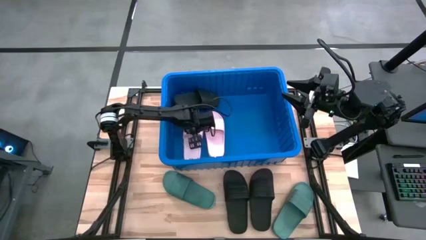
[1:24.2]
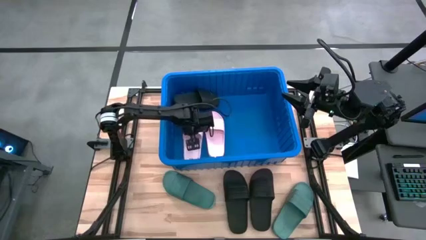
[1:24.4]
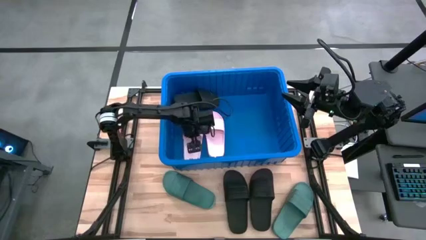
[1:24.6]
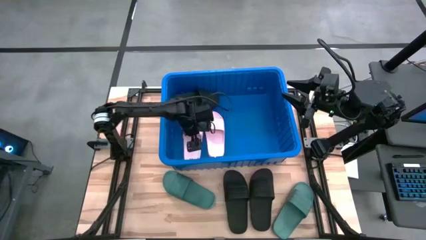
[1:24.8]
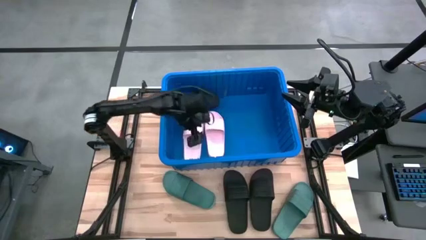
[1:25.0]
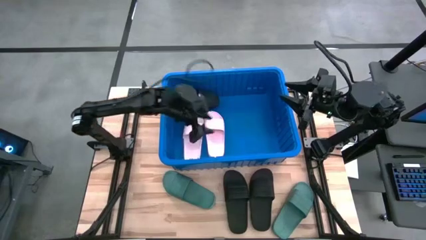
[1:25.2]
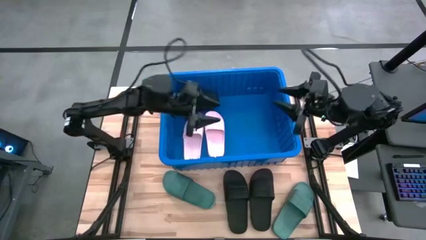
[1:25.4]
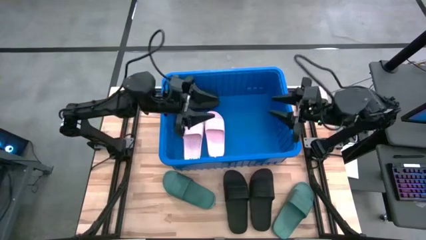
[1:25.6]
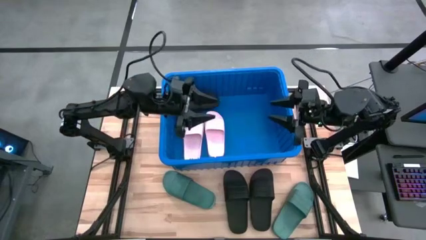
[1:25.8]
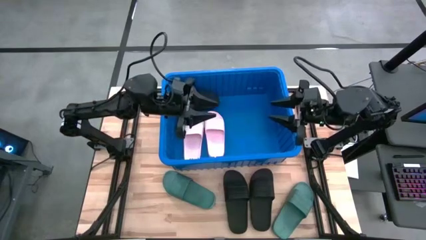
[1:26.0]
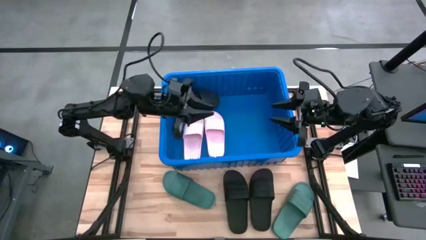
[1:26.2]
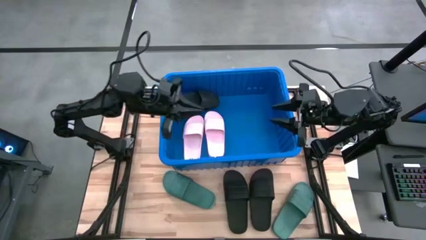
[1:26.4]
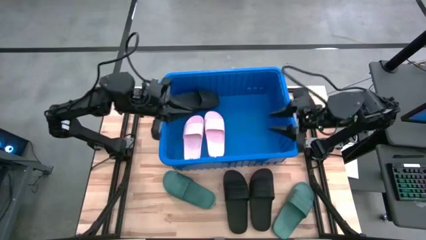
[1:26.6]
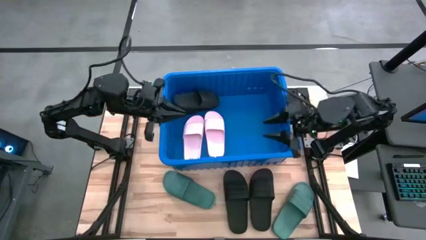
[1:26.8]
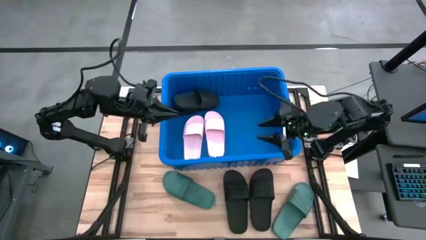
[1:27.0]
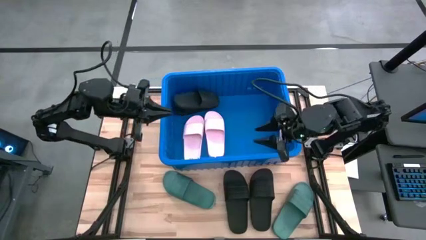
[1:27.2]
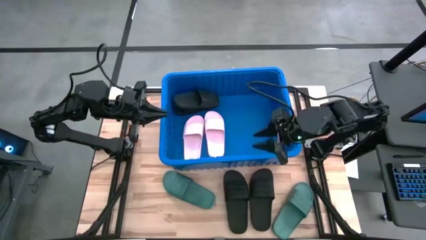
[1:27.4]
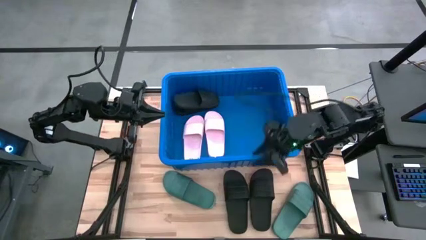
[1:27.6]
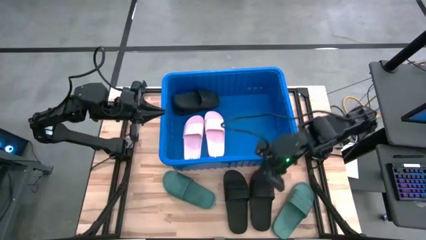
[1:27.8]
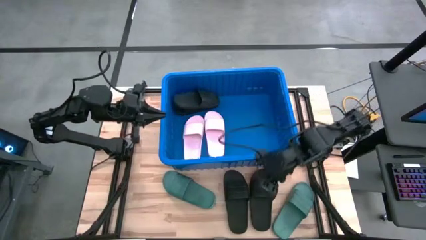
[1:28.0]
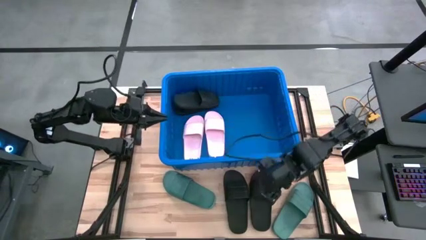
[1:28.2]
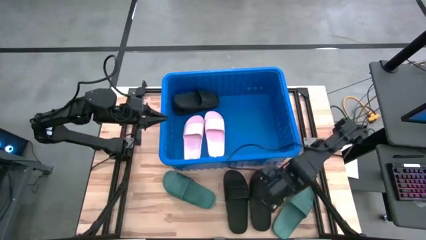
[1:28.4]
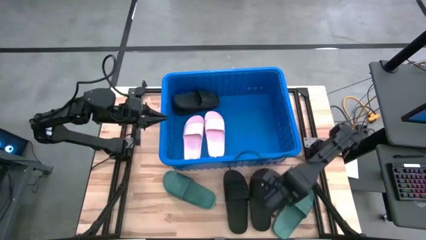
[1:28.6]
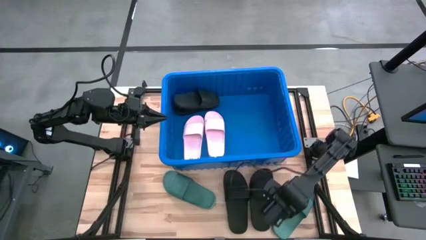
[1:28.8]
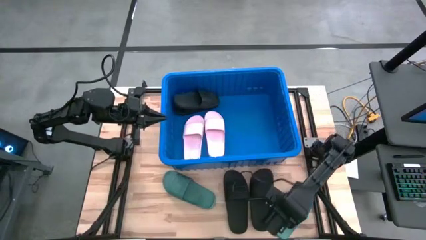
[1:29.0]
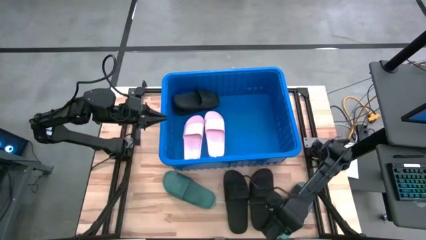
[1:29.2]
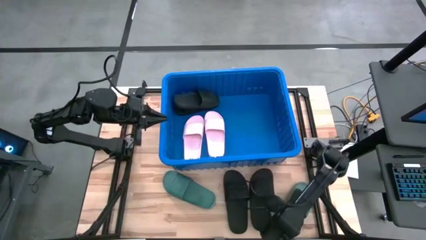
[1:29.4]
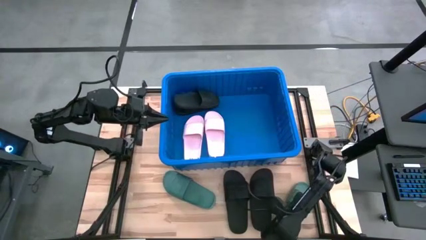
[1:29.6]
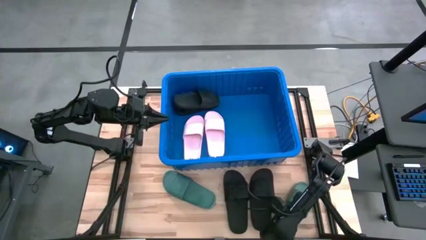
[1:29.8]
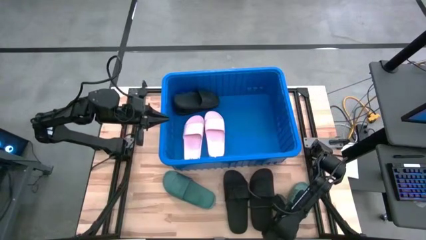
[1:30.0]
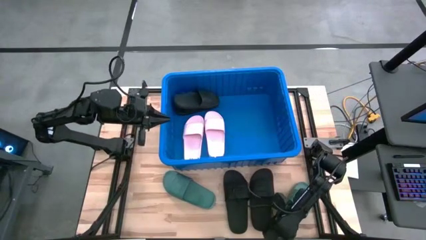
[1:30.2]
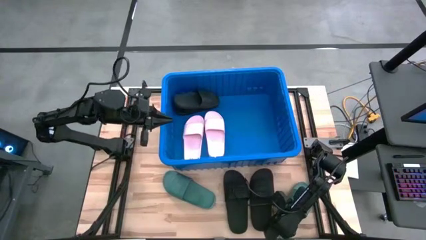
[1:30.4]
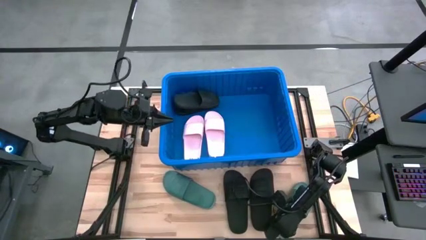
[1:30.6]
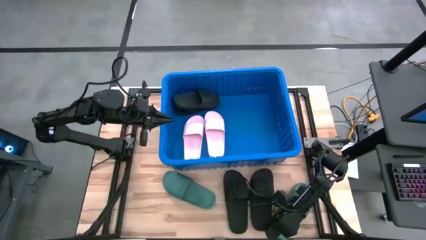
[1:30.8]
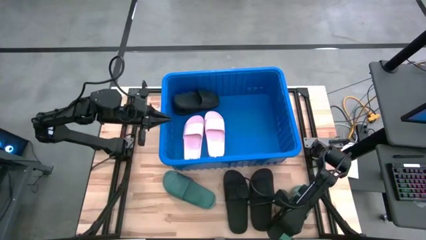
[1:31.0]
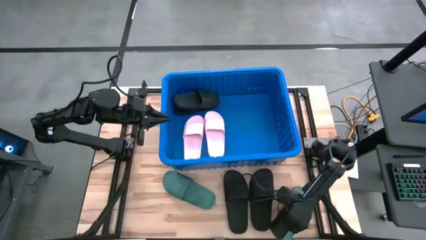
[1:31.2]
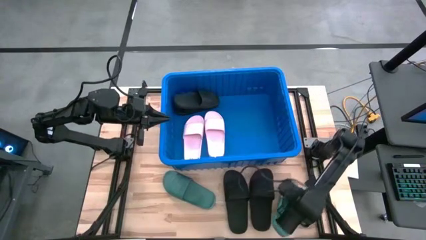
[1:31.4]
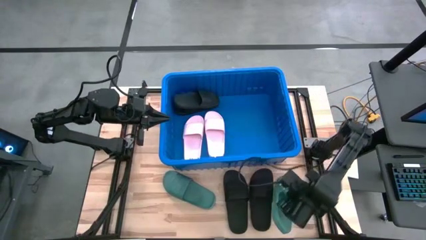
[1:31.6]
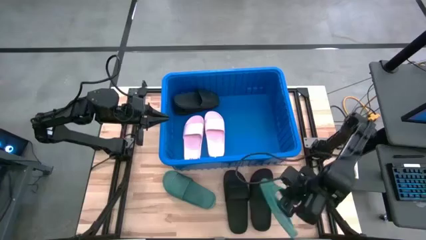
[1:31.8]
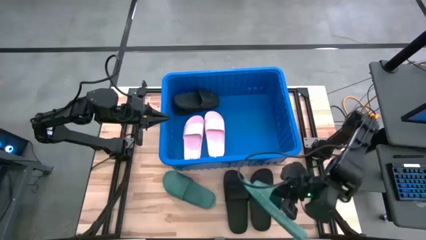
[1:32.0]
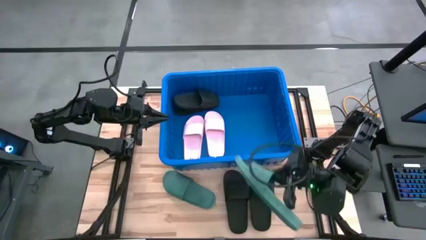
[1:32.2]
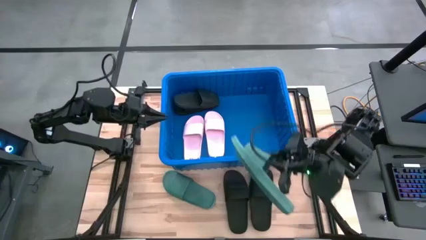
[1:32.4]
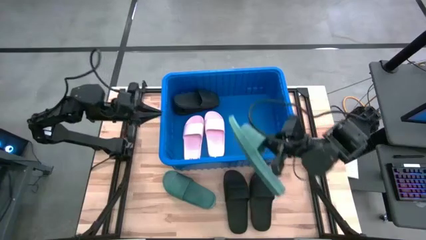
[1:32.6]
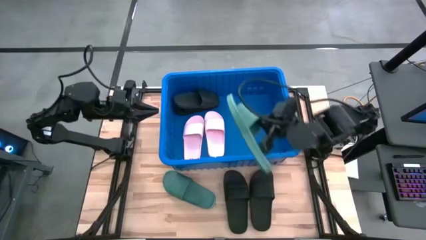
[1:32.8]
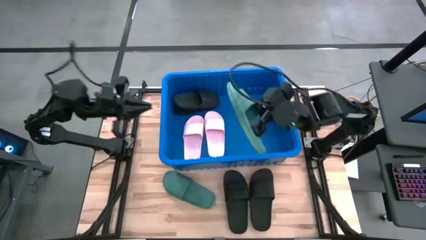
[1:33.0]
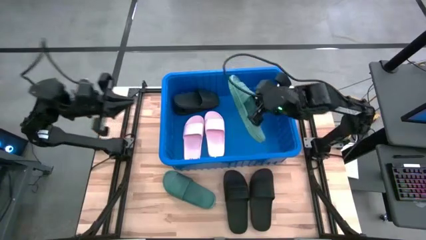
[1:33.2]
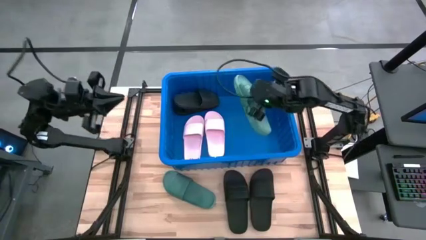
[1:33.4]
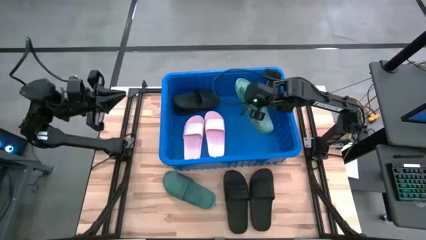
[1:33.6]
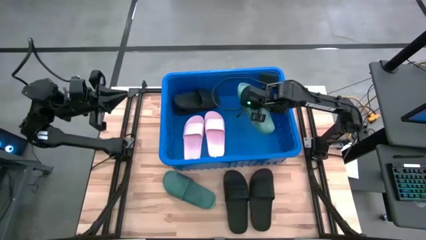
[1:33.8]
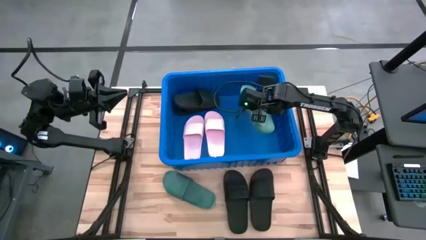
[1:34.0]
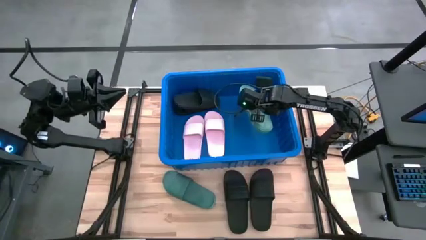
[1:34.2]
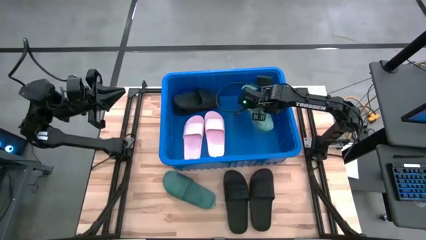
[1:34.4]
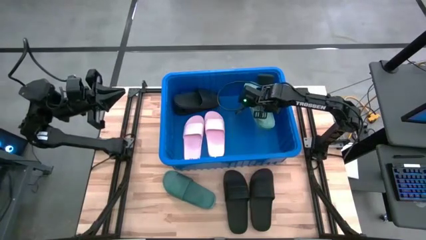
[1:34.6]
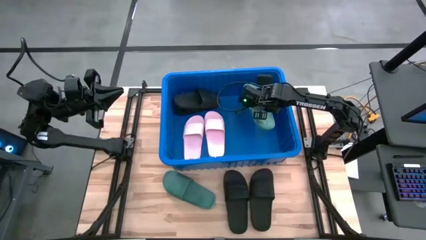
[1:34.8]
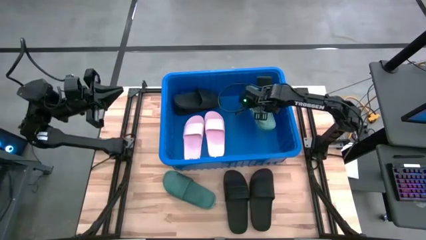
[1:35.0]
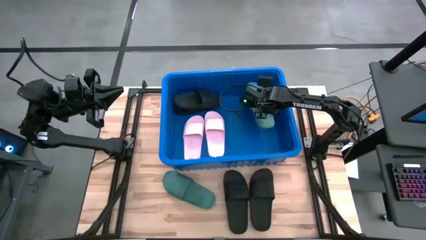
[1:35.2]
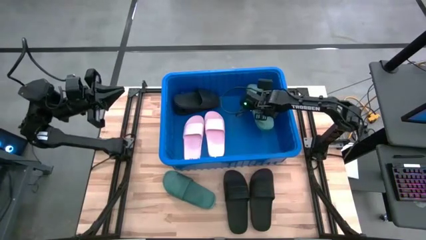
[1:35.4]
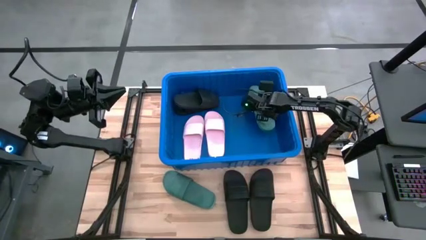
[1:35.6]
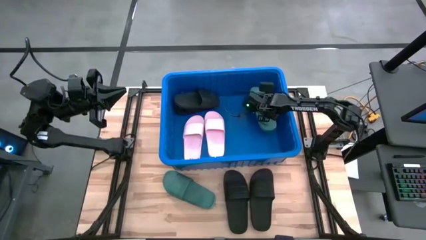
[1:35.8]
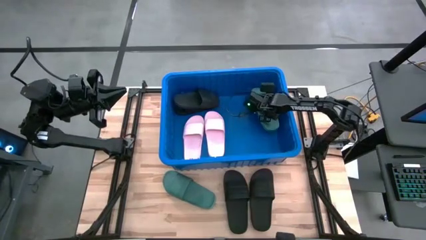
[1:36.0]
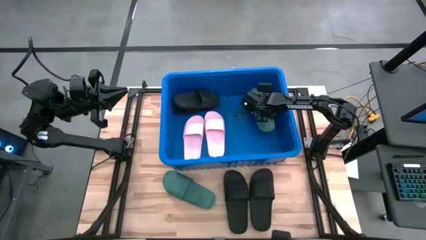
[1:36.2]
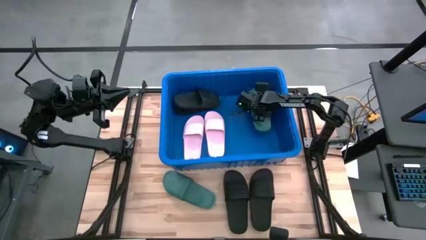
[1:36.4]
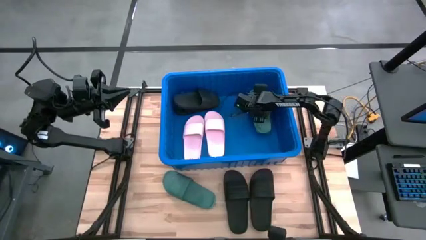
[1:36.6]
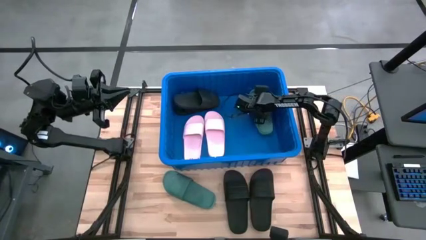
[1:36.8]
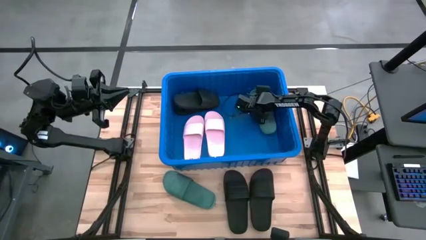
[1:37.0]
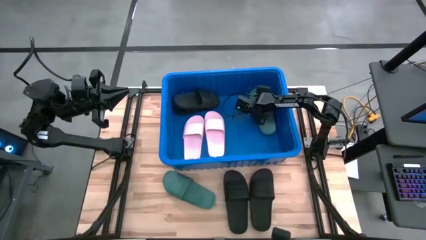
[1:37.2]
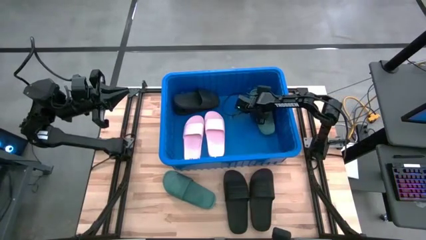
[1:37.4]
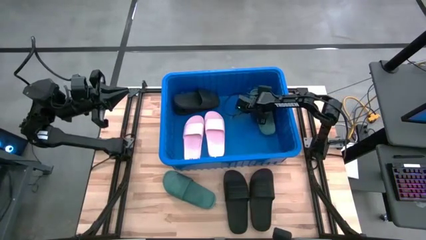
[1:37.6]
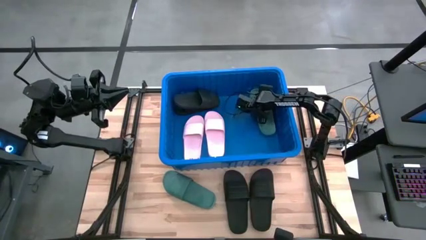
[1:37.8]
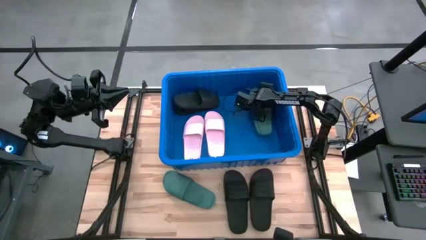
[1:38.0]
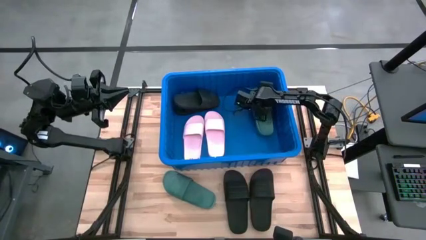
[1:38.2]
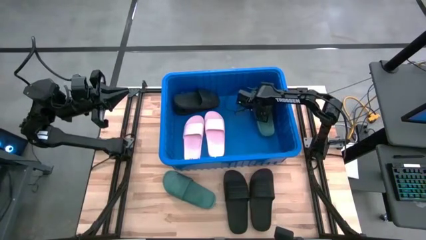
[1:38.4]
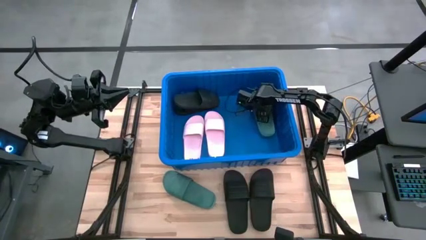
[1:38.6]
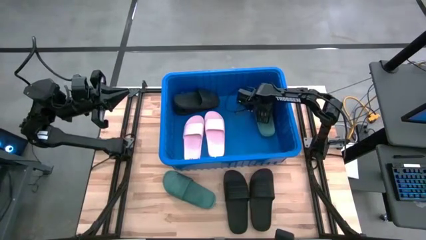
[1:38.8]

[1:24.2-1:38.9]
Task: Pick and place slides into bin
Put the green slide into the blue container

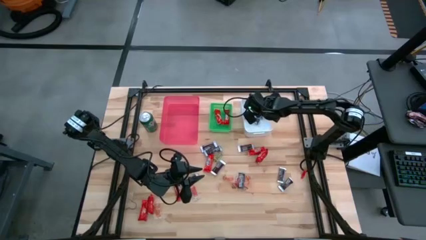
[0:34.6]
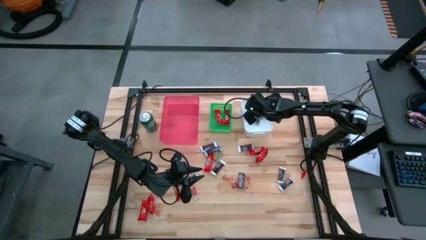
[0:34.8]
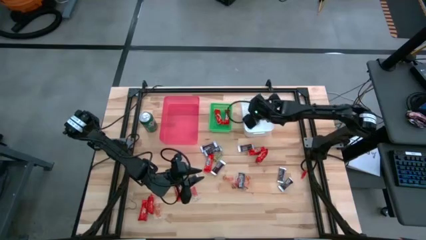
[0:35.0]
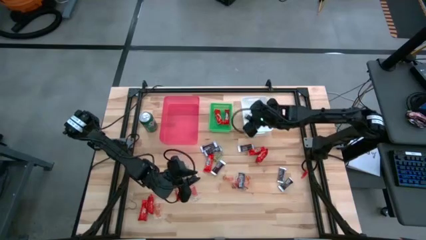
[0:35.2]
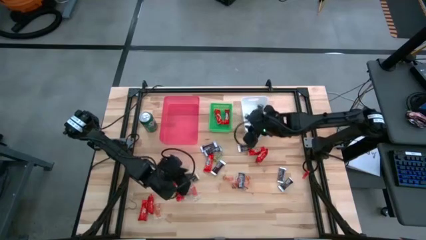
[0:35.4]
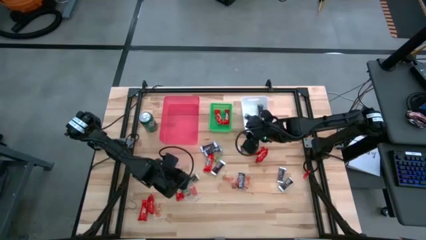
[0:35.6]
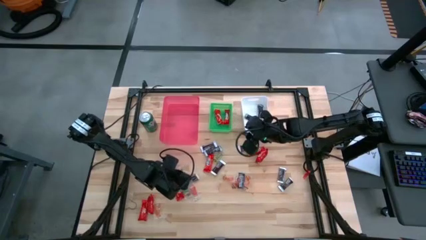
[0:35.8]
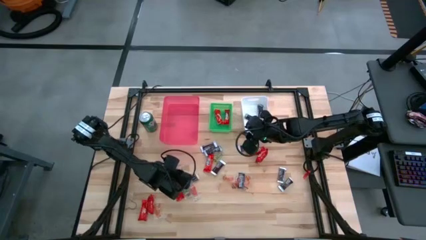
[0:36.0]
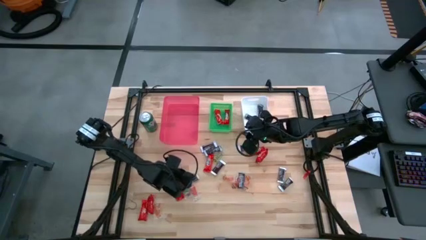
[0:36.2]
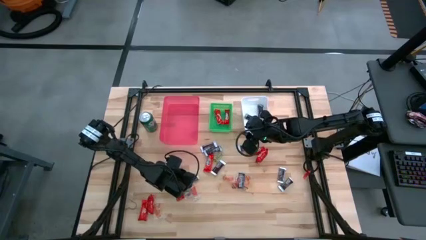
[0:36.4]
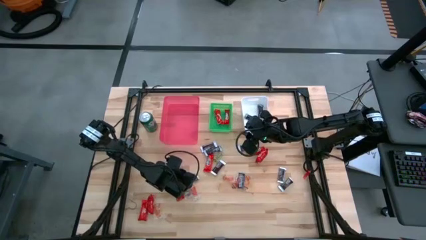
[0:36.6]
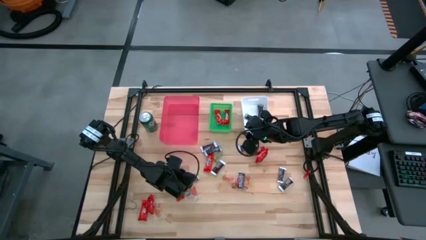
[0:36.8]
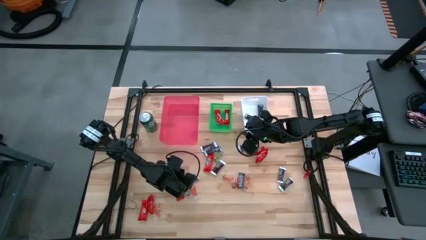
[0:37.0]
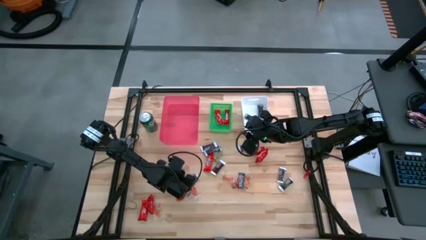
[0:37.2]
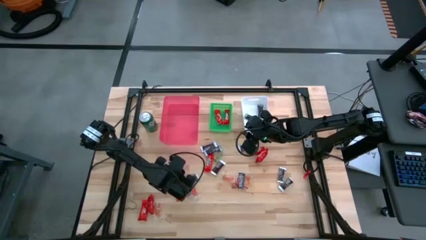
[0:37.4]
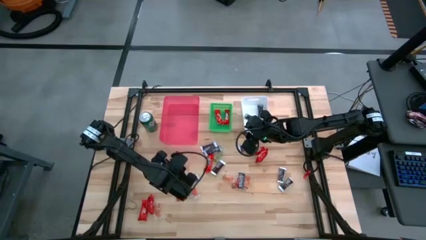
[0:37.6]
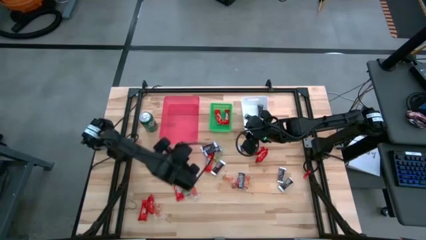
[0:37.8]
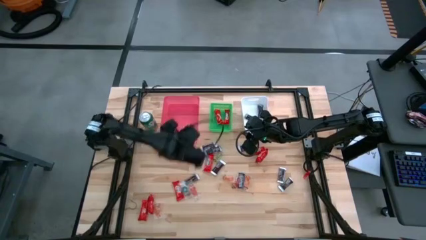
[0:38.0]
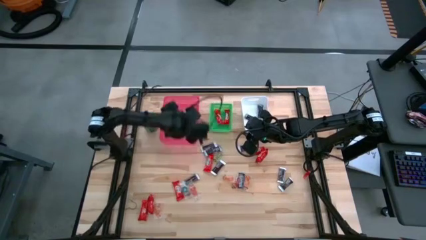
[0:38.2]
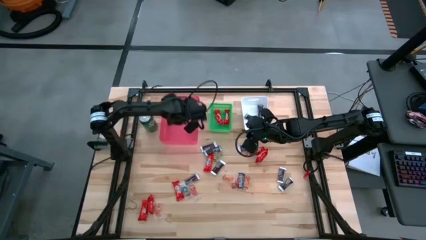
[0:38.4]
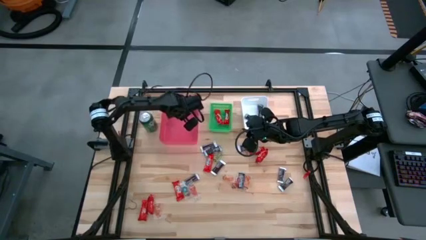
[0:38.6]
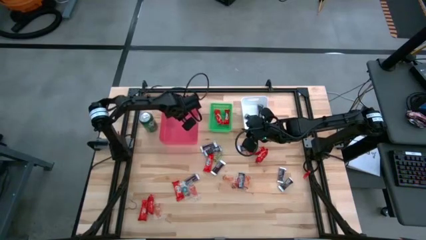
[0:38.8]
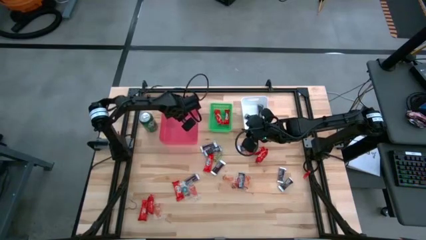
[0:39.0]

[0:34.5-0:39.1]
Task: Sort candy
Put the blue gummy into the red bin
